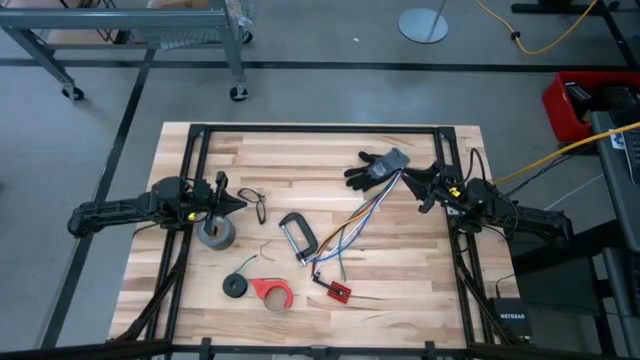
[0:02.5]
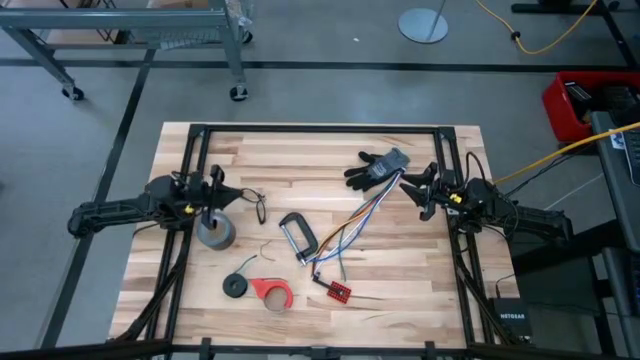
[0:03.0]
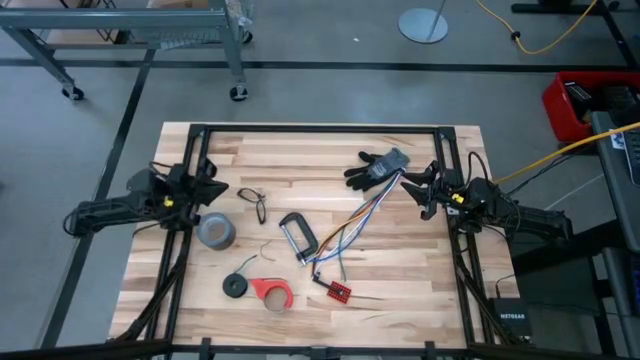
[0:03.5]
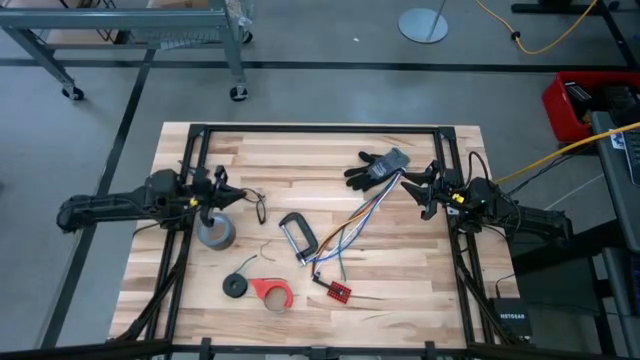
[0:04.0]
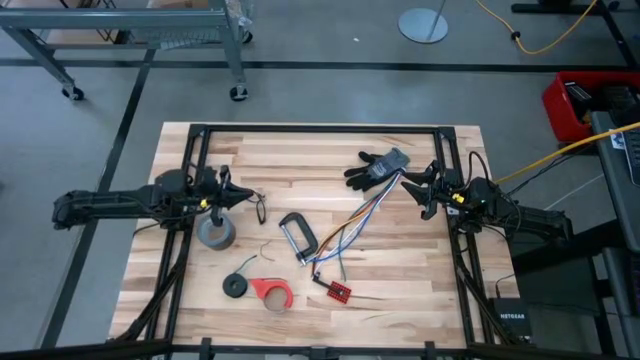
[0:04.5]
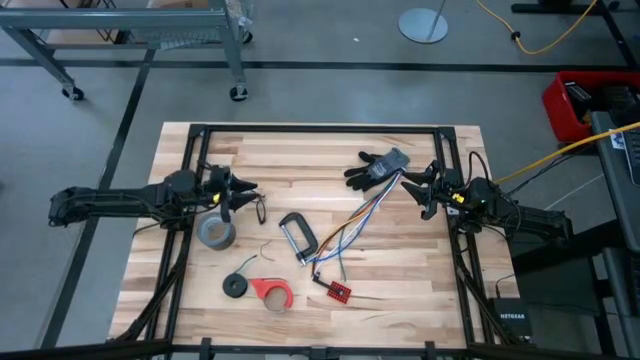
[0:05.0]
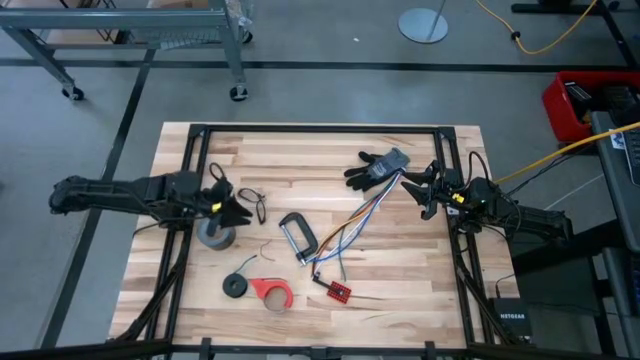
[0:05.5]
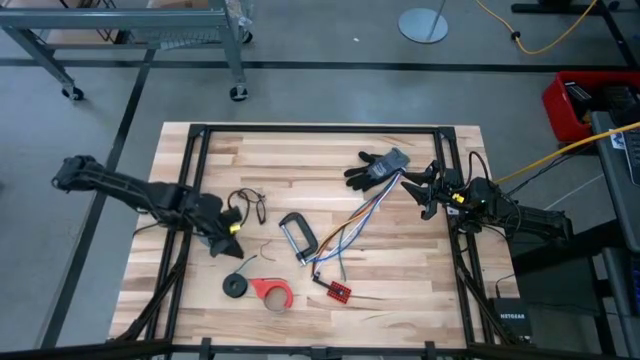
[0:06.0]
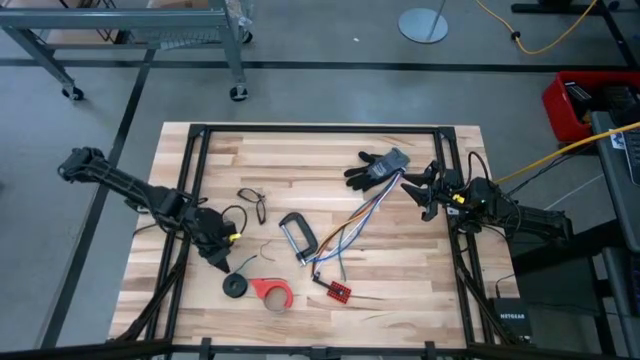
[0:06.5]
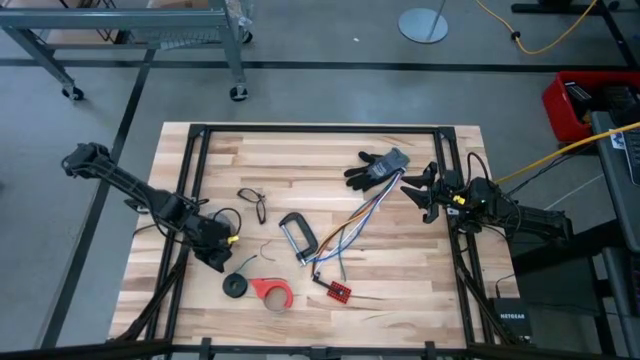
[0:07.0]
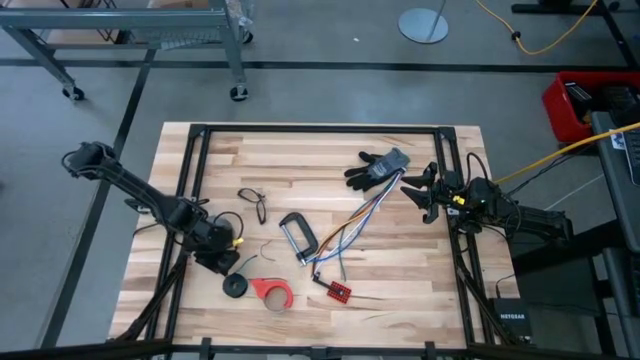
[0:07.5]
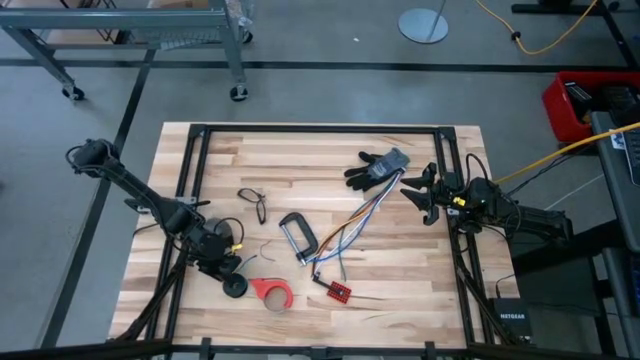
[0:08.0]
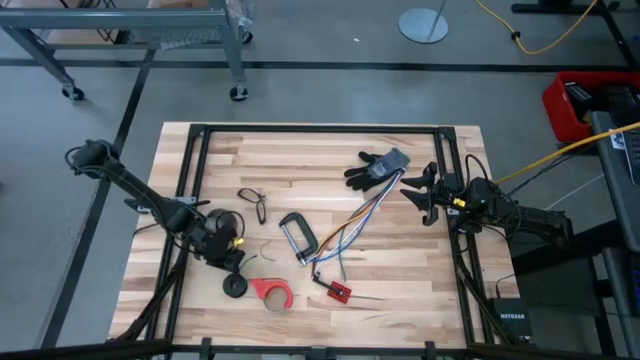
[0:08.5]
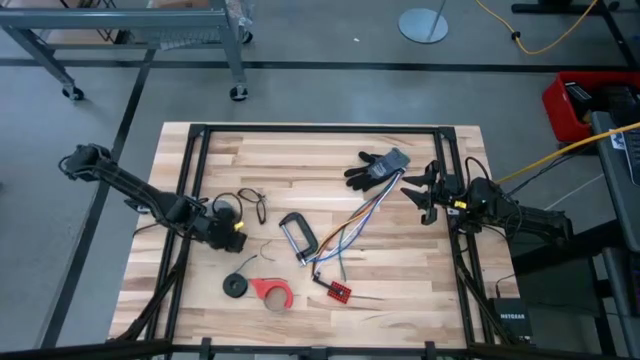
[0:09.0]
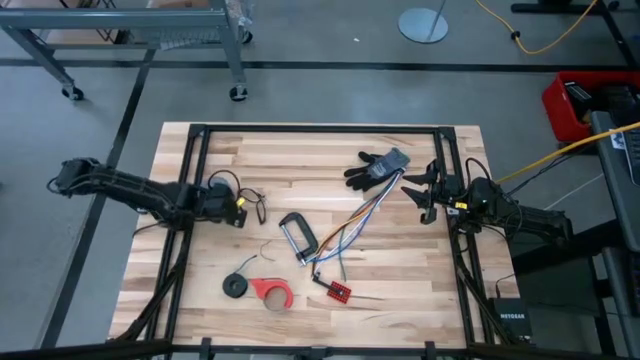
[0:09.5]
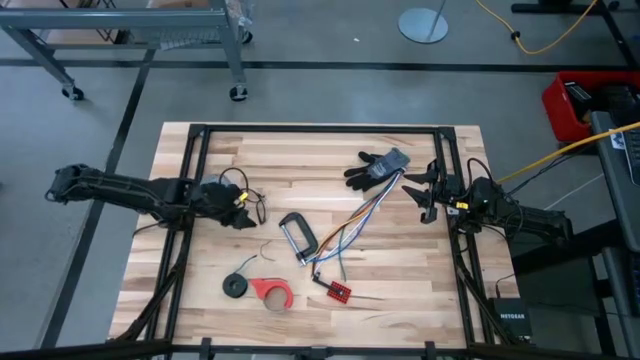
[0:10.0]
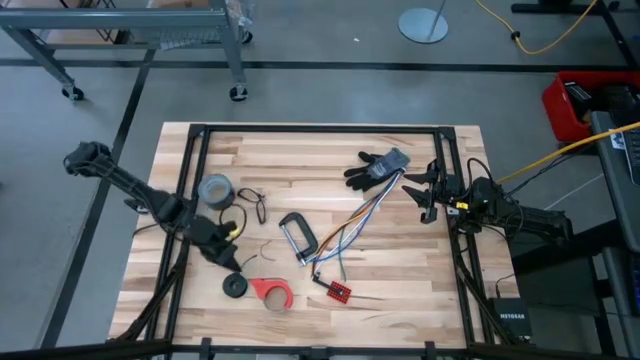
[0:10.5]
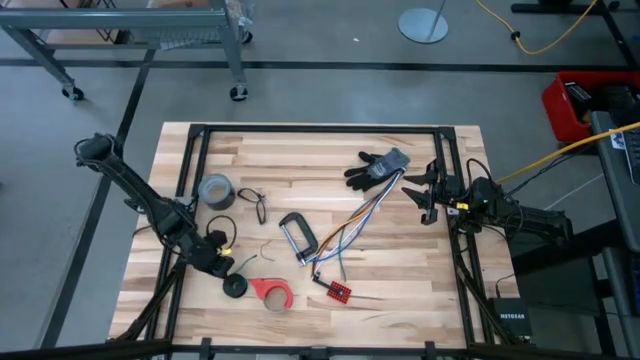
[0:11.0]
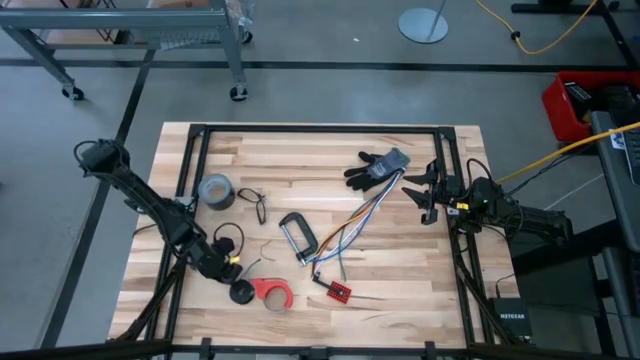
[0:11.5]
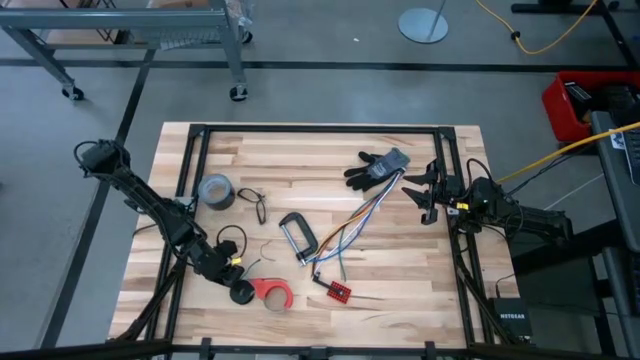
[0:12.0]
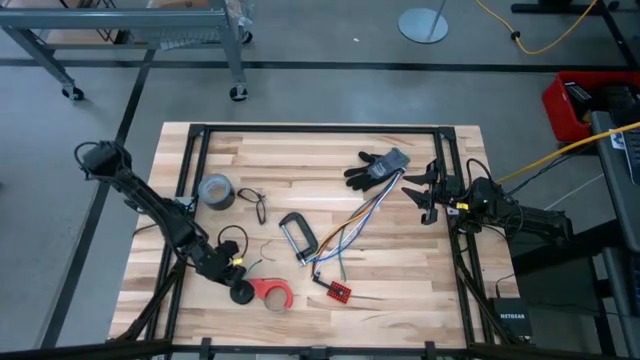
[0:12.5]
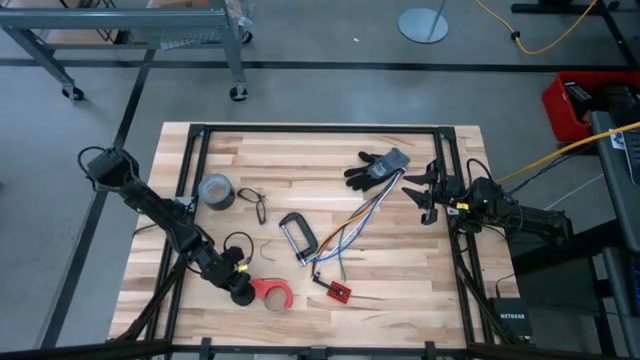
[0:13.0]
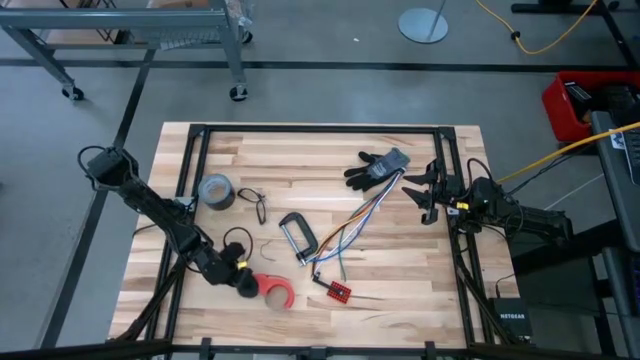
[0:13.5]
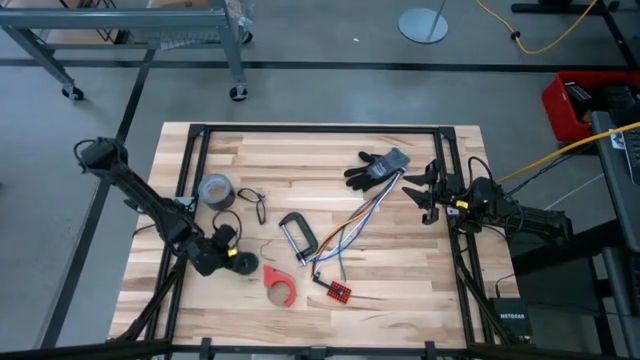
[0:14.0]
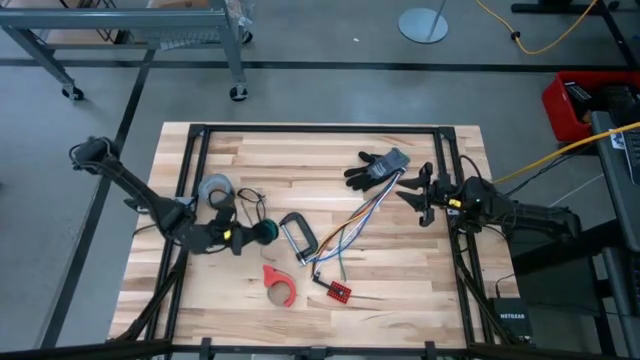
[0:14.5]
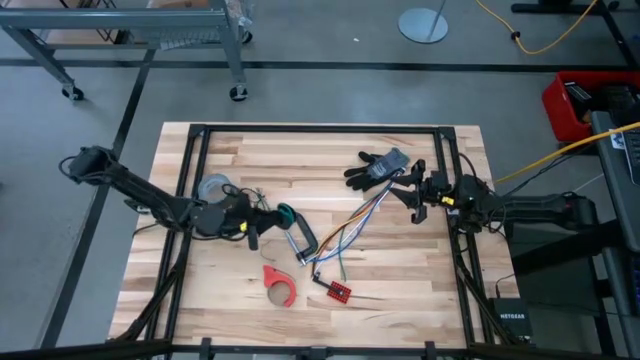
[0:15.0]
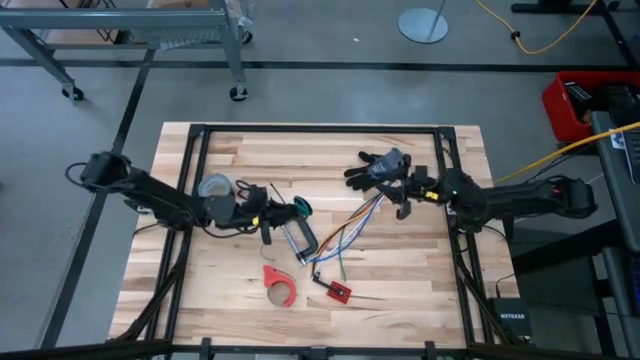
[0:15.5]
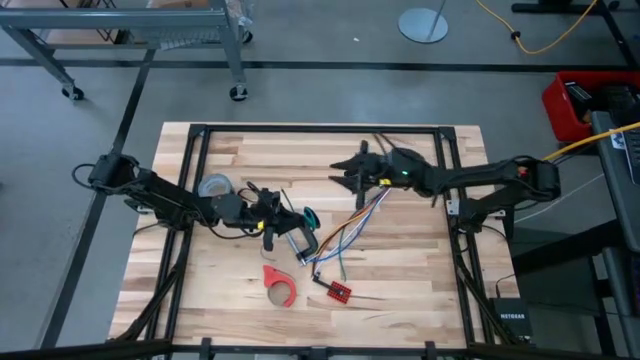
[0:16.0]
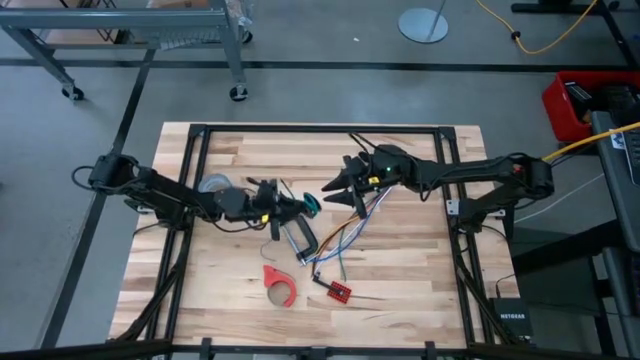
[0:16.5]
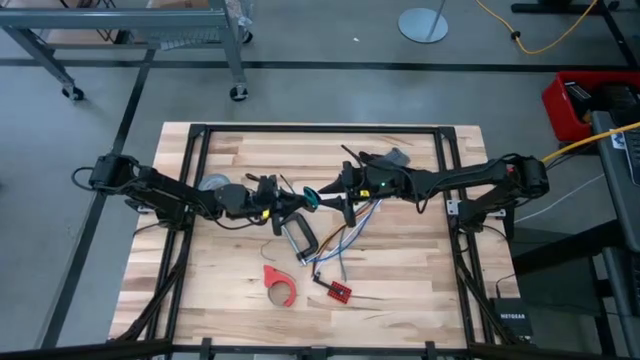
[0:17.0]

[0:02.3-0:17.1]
Task: Coil cords
Uncoil the green wire from the spool

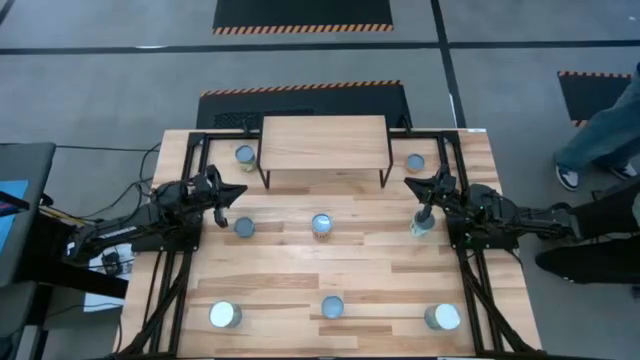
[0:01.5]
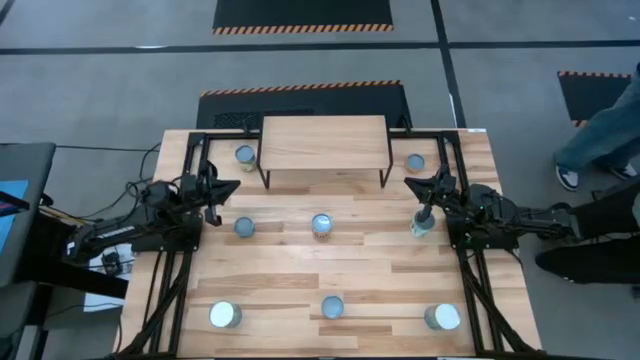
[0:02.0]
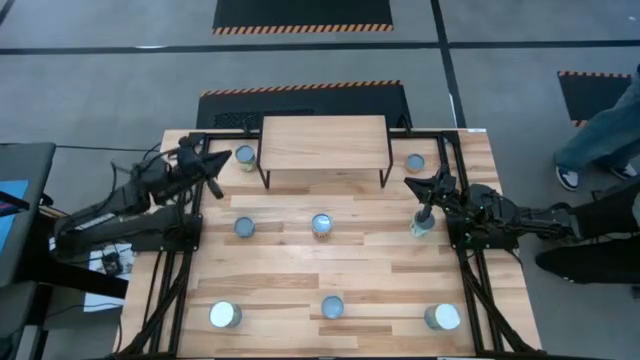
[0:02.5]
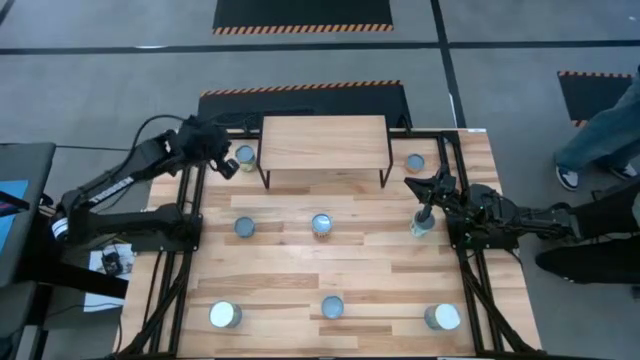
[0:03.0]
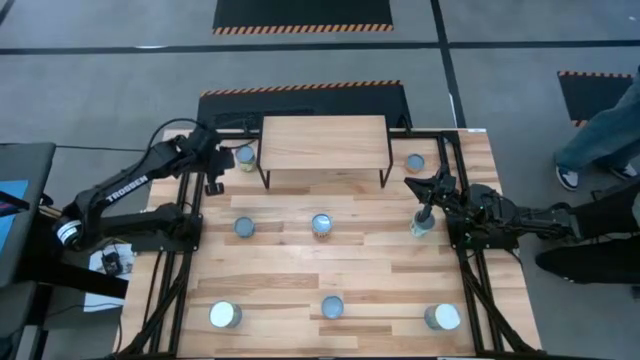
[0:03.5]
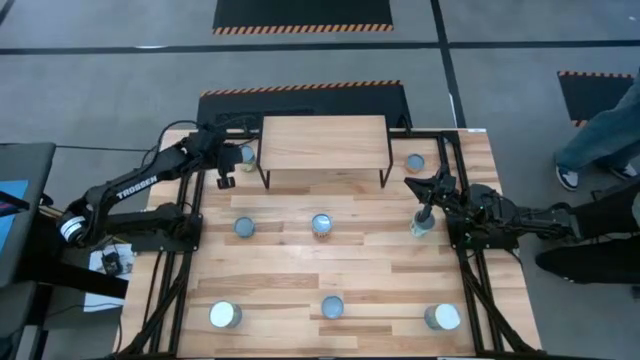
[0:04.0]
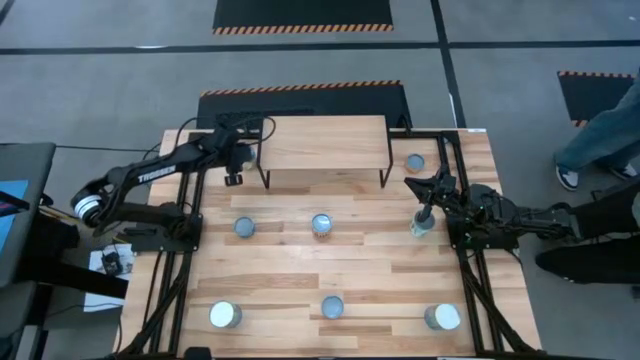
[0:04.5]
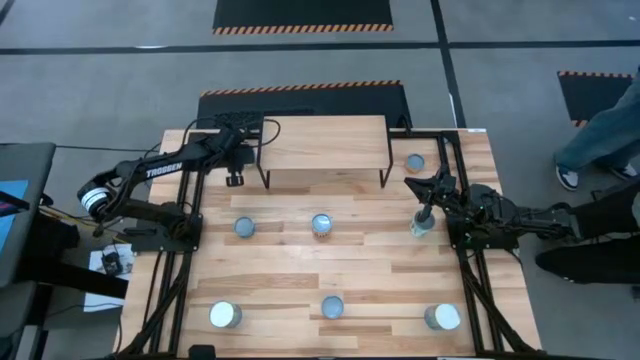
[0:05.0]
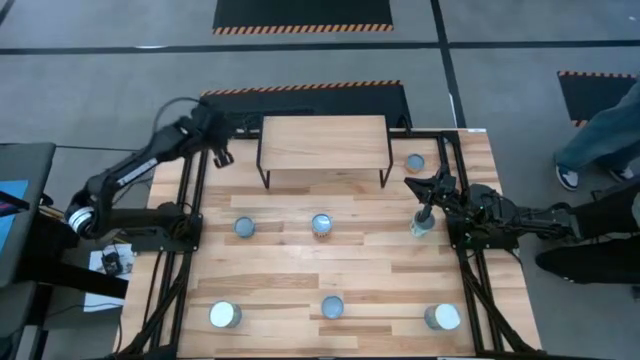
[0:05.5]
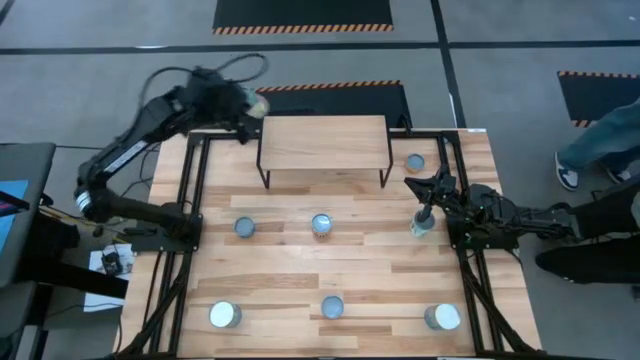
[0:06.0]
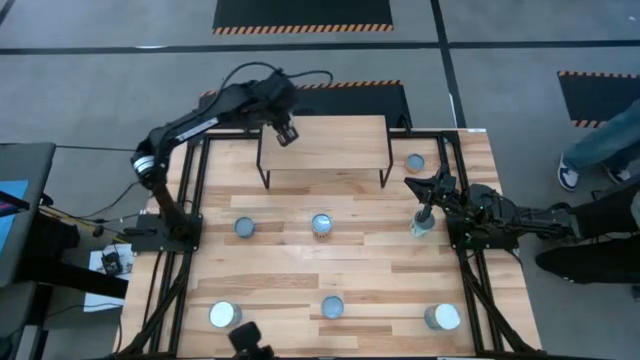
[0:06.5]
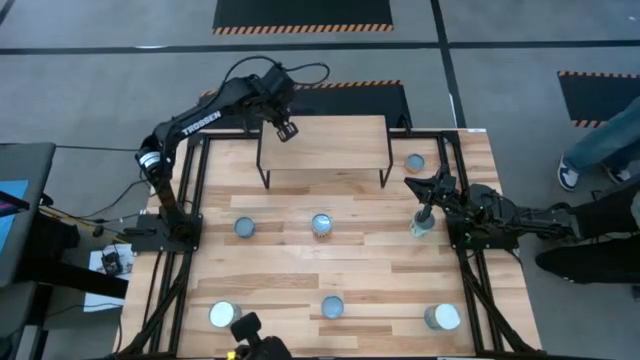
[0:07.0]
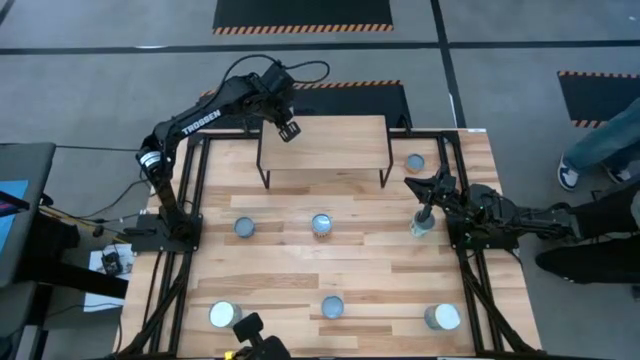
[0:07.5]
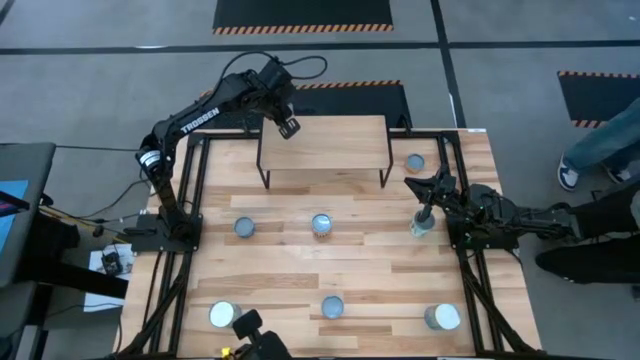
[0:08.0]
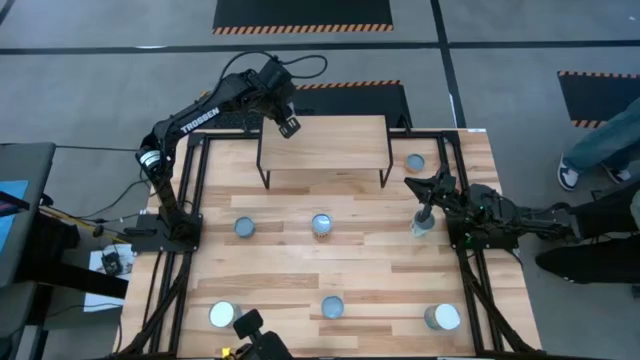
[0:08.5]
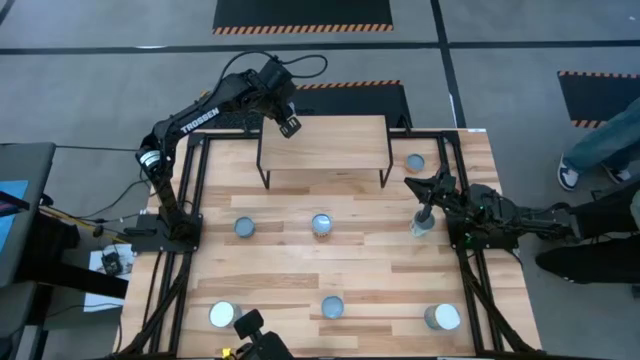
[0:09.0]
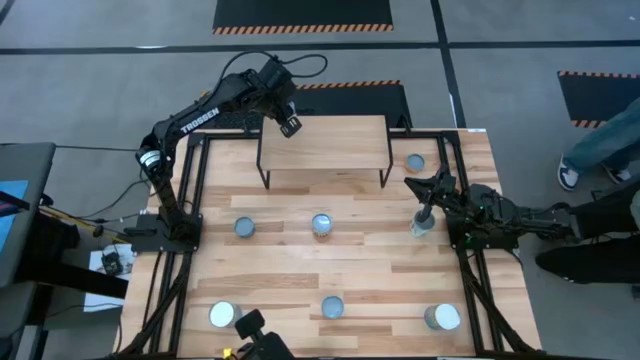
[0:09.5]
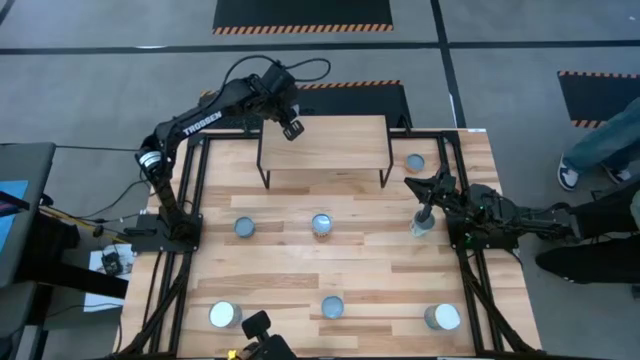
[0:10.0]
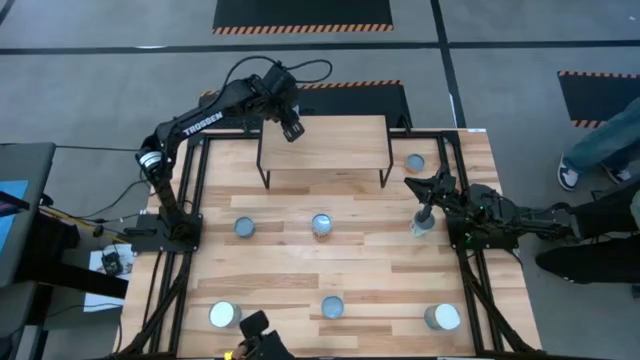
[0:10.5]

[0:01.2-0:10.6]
Task: Pick and place cans onto a shelf
Put the green cheese soup can on the shelf
